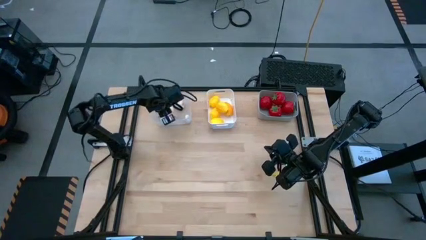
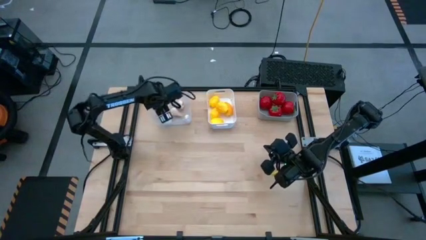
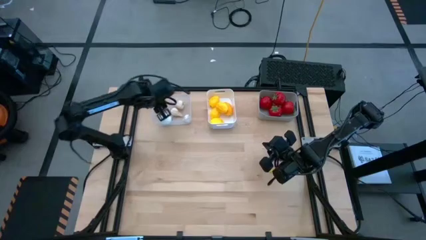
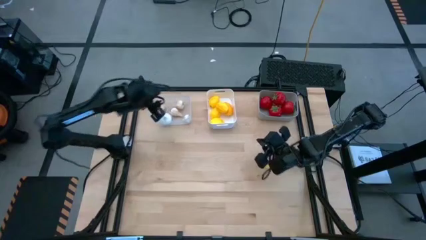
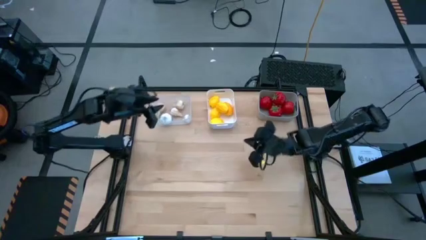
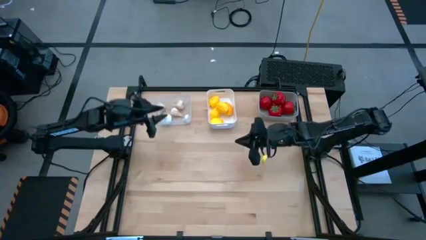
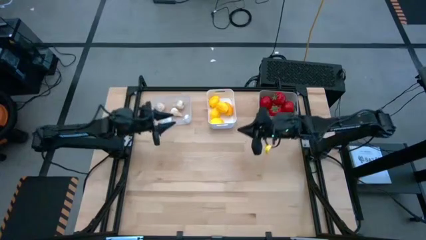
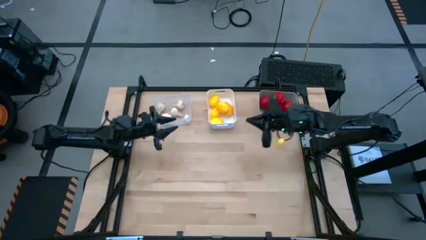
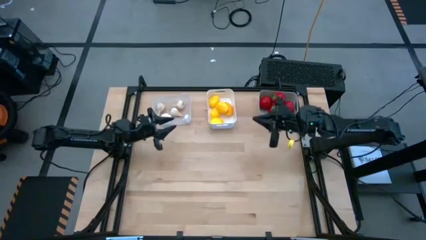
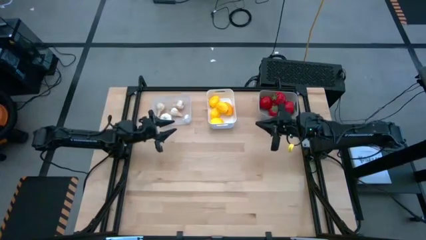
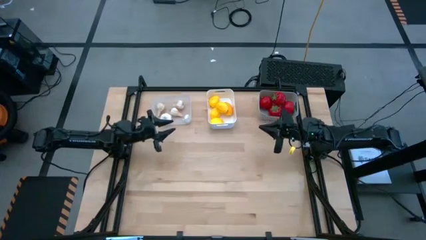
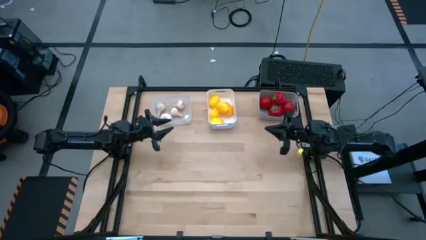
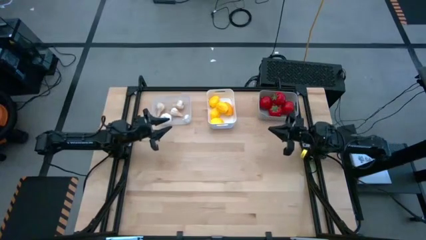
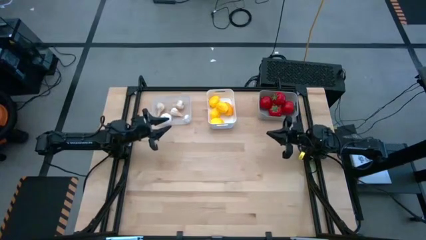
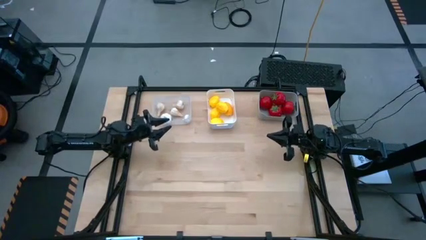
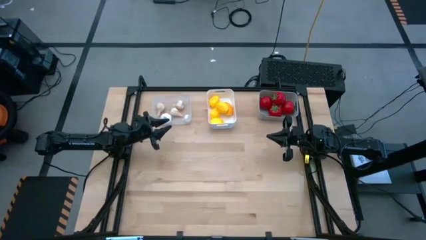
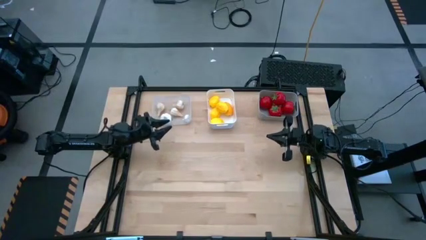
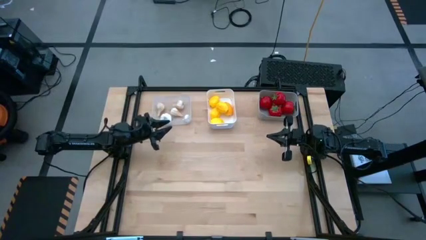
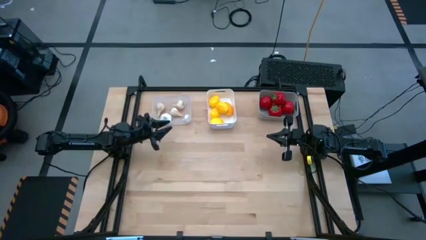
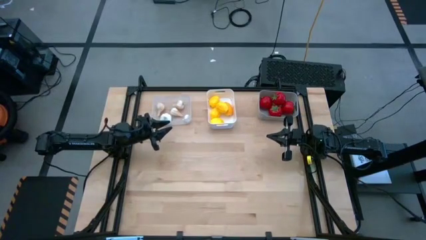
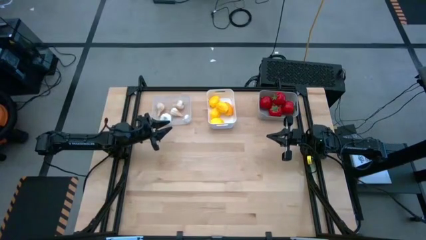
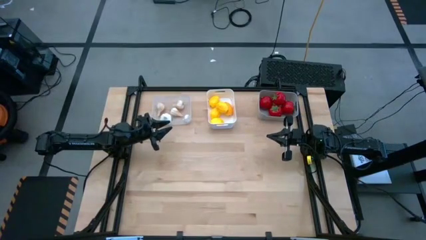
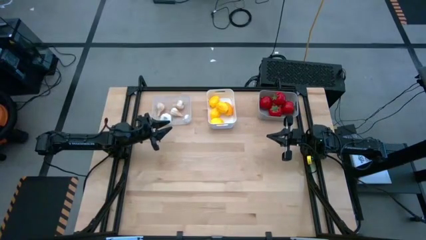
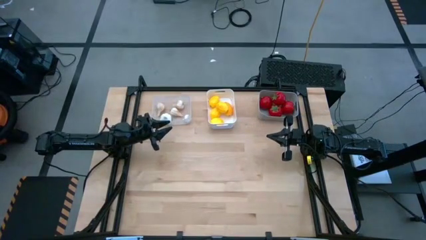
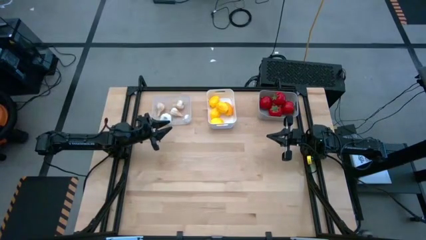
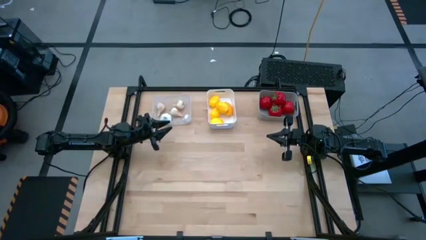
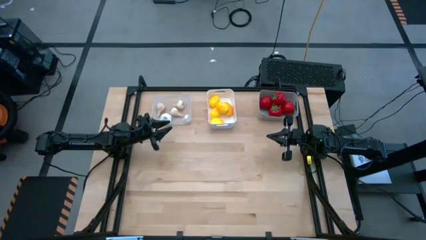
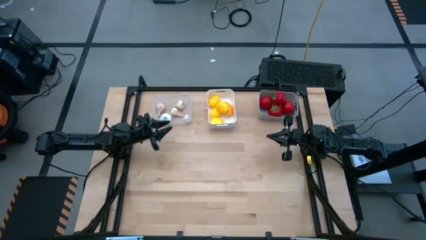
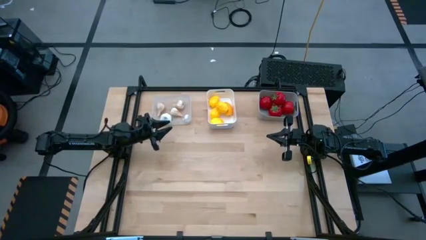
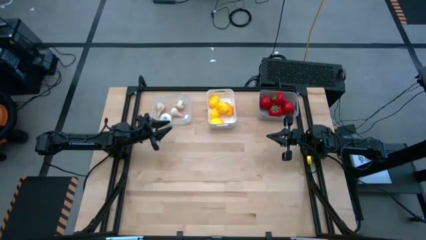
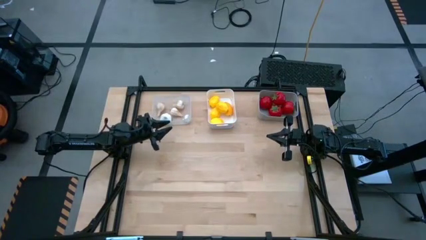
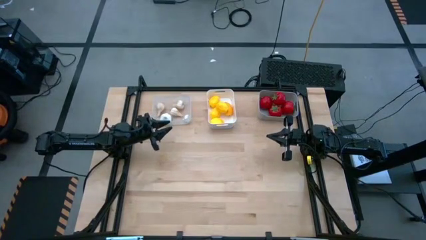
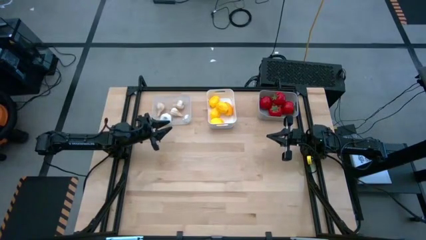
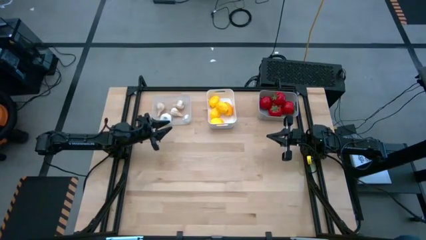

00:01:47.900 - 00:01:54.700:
Task: Sort produce into baskets
Return to Home Position

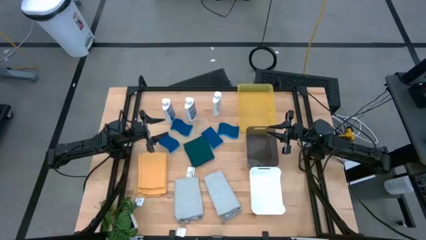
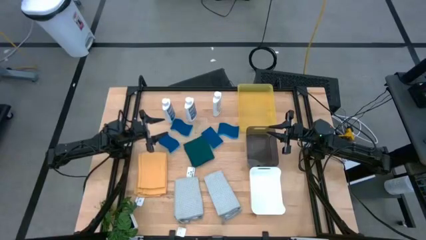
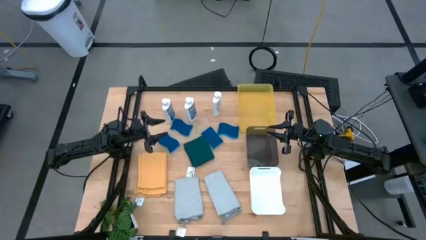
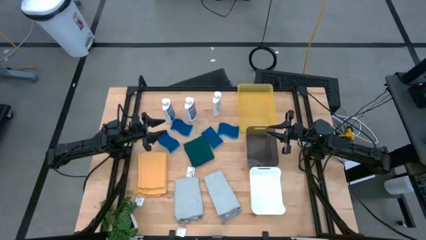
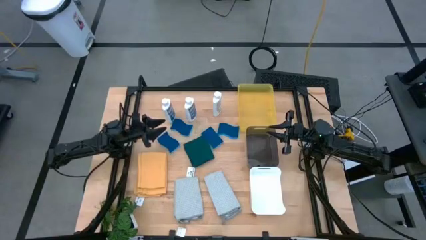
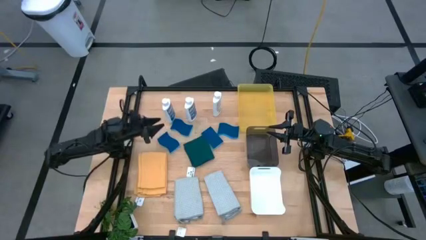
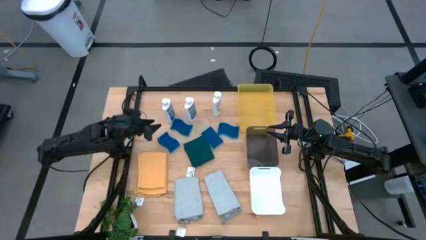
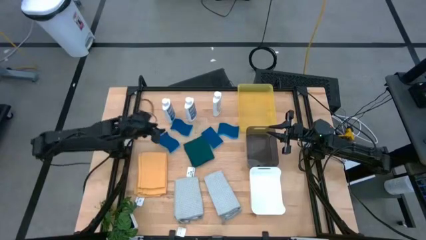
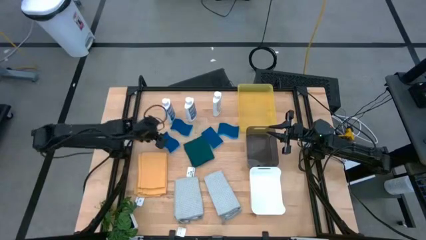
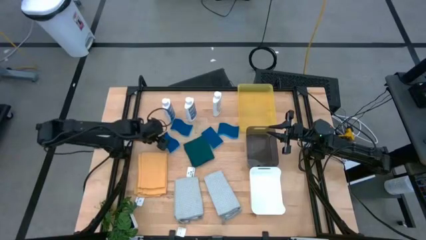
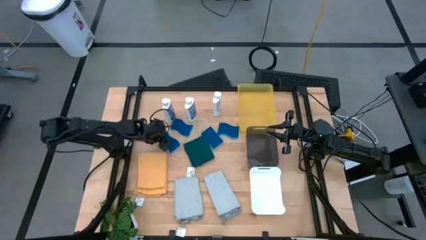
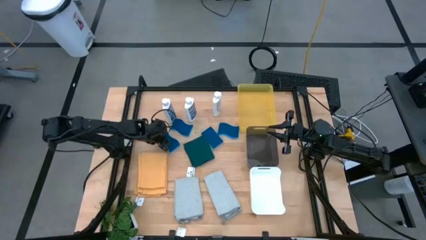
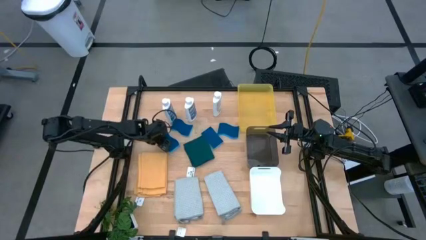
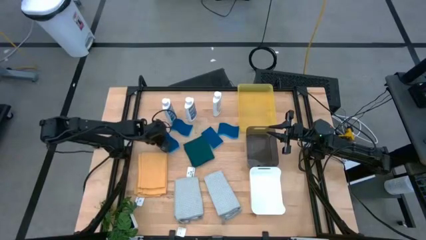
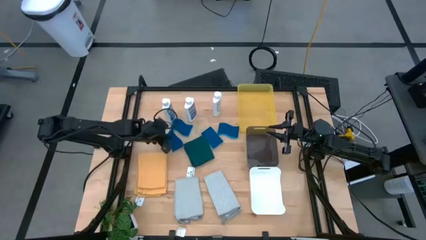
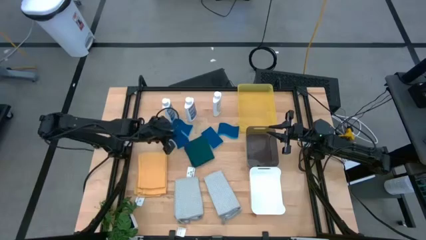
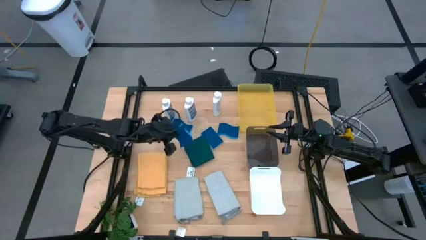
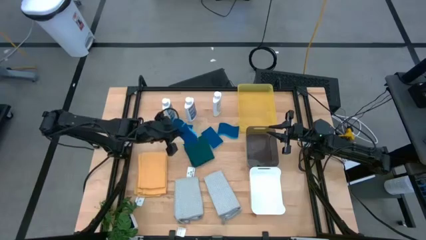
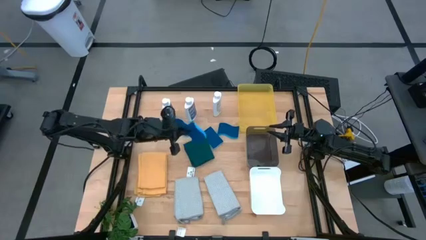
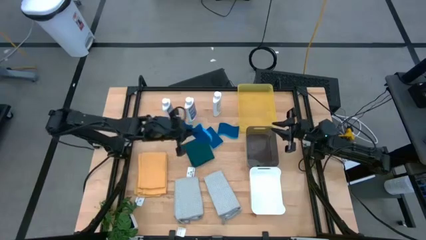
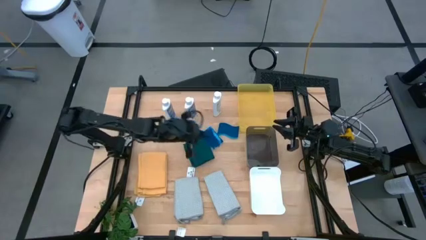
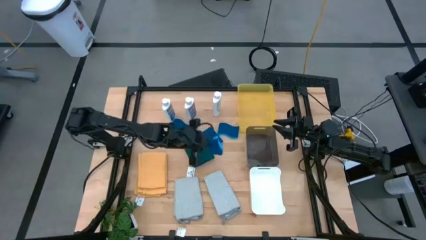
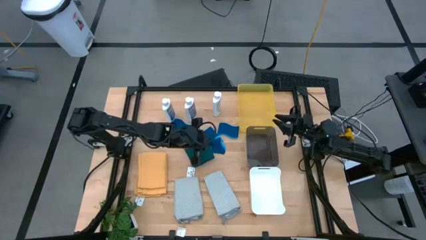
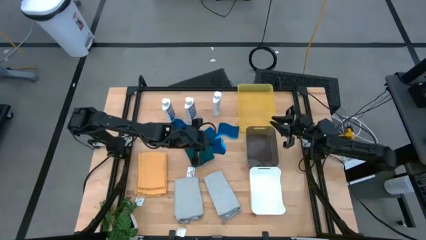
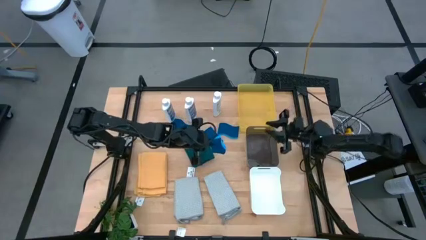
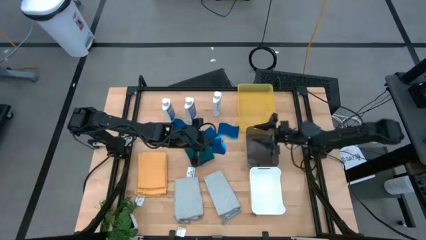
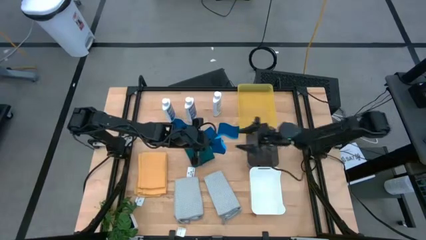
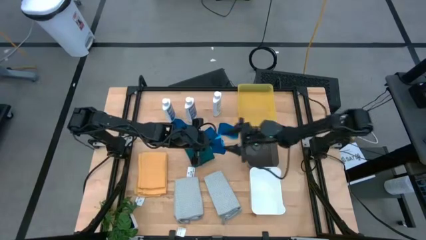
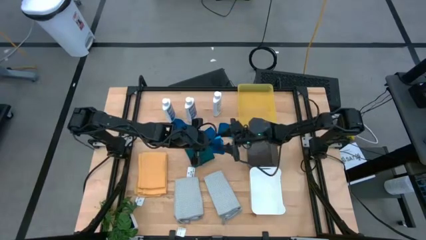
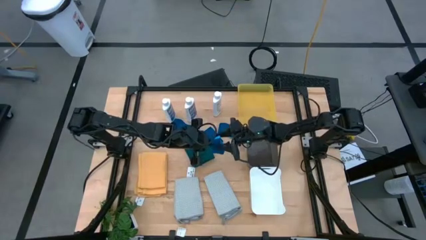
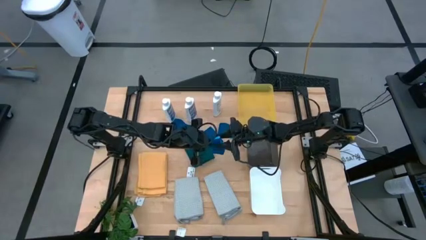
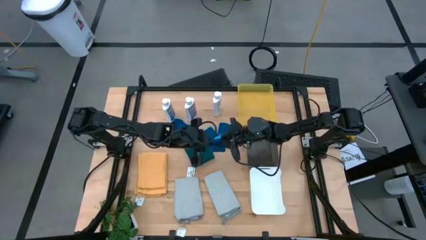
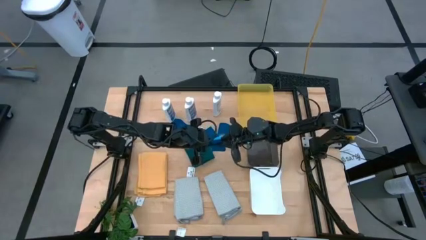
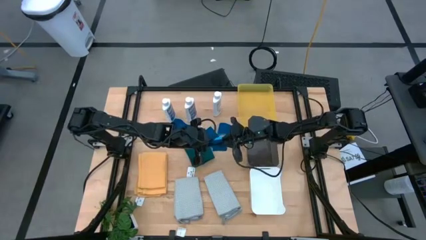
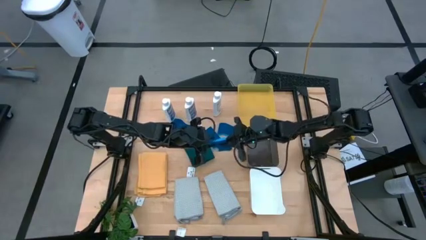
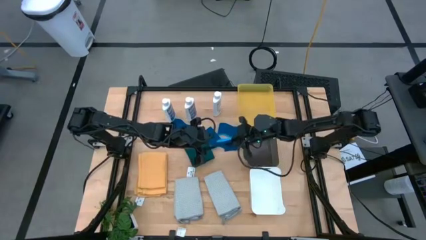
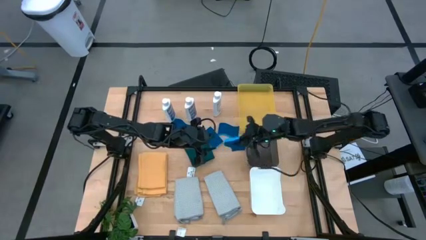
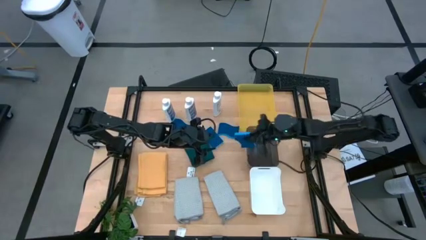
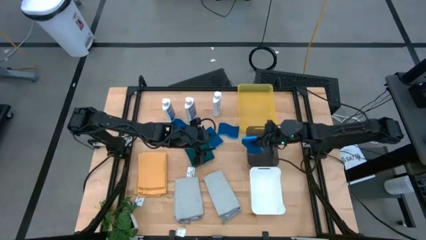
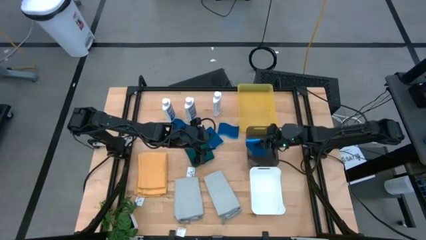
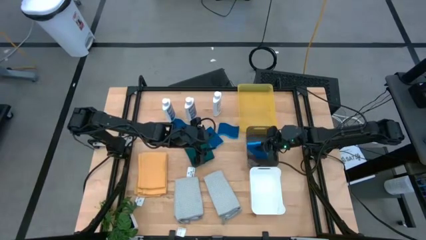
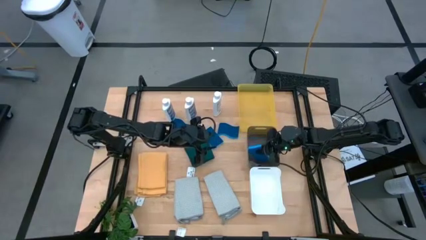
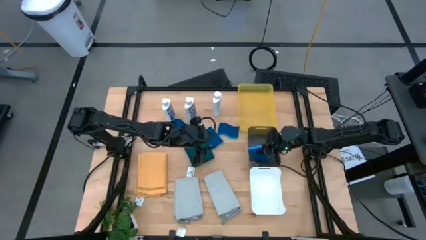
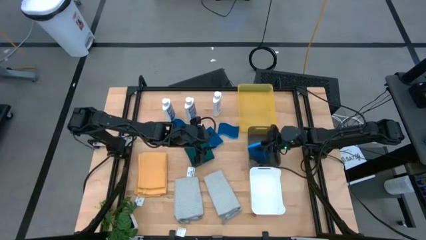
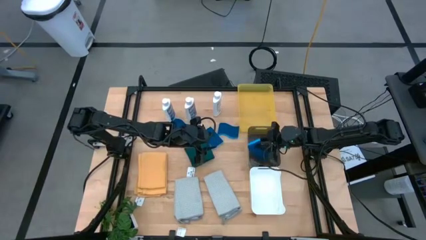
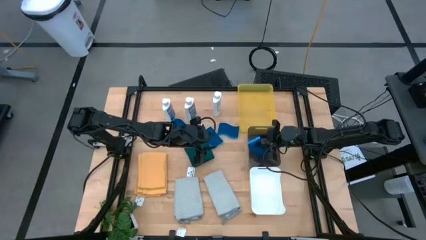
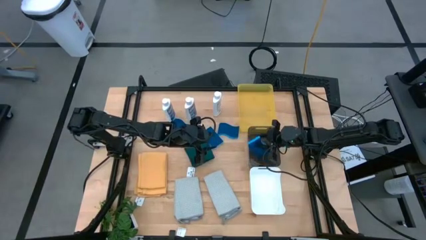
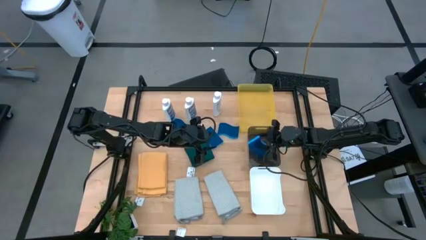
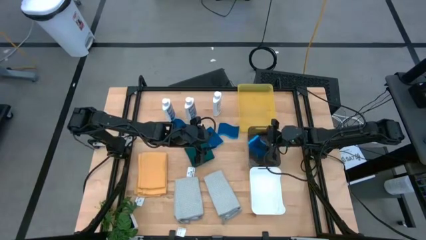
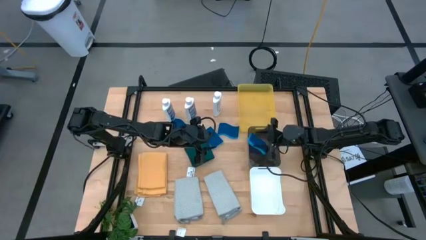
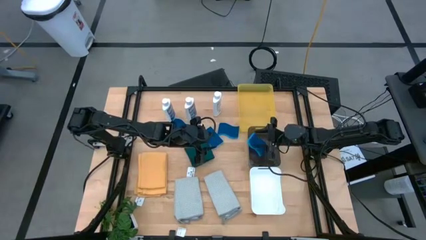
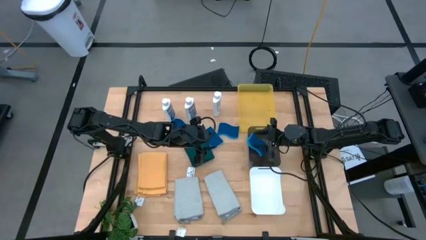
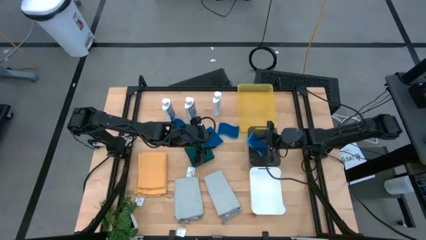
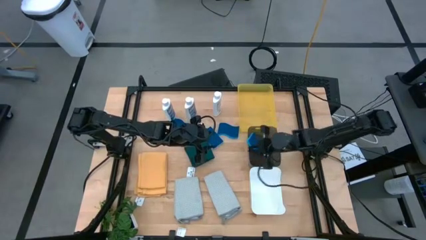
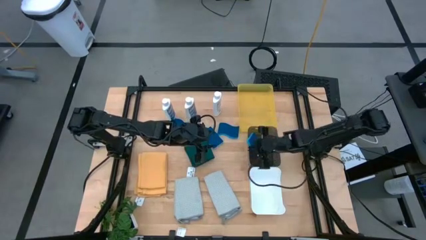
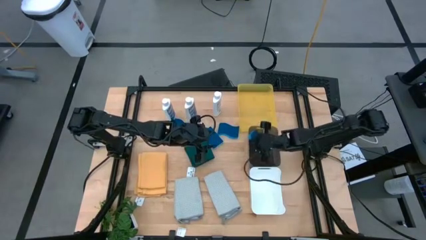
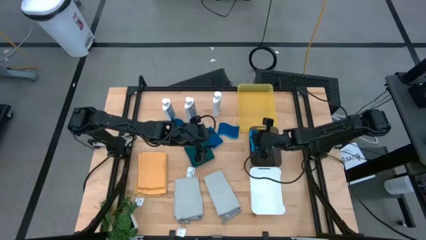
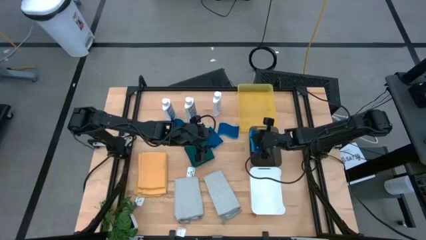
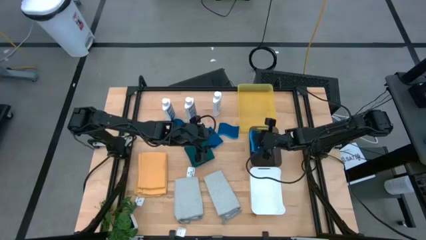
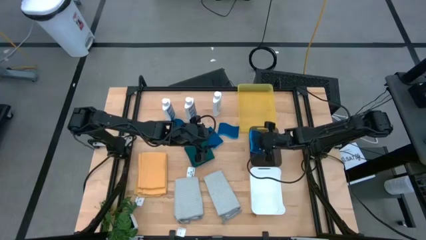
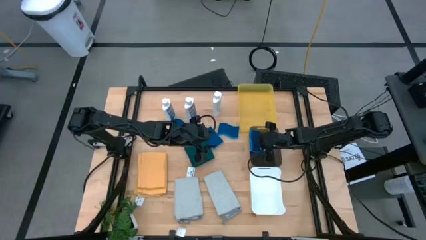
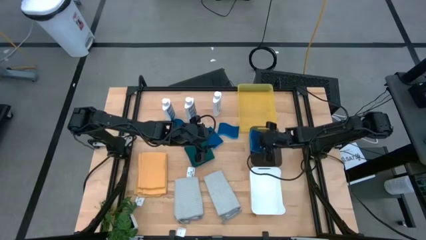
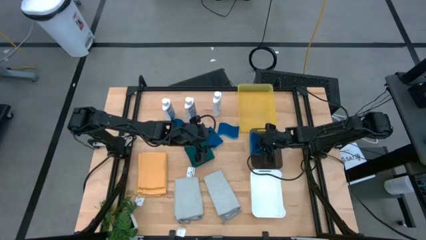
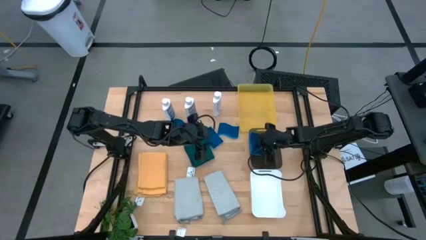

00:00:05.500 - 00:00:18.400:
Task: Pick & Place Kitchen Items
Put the blue sponge into the black bin
